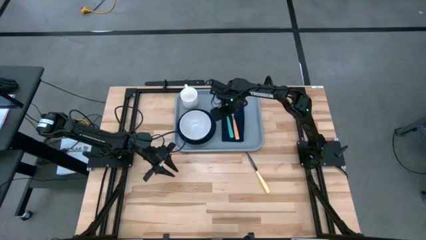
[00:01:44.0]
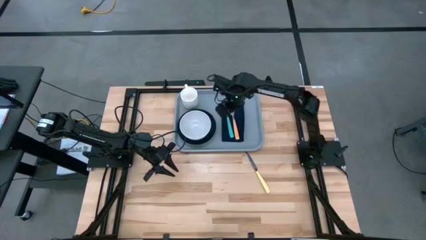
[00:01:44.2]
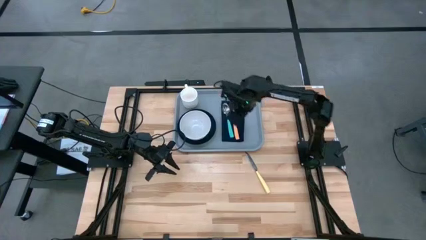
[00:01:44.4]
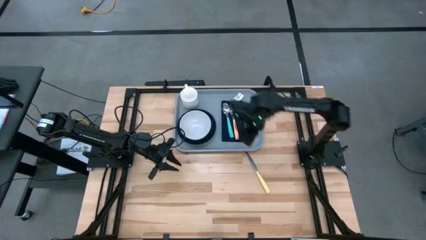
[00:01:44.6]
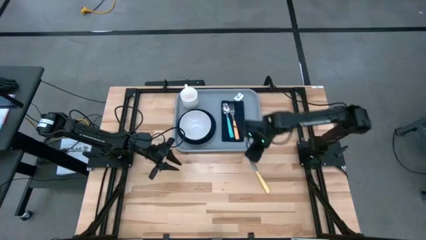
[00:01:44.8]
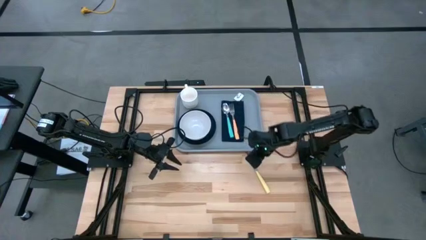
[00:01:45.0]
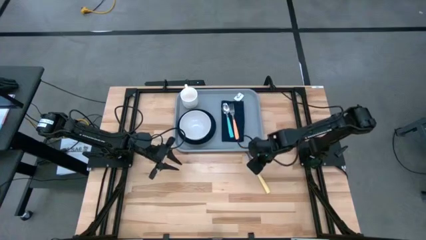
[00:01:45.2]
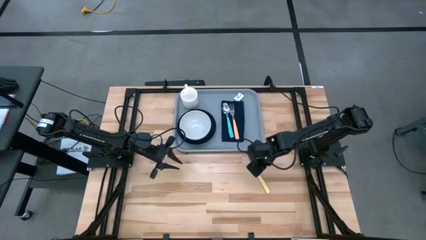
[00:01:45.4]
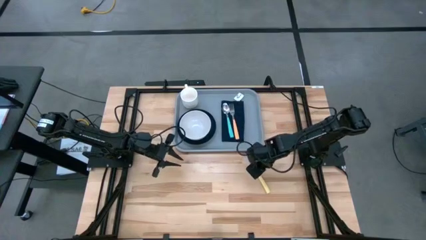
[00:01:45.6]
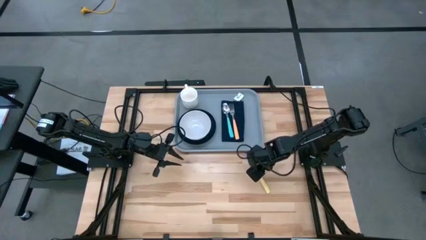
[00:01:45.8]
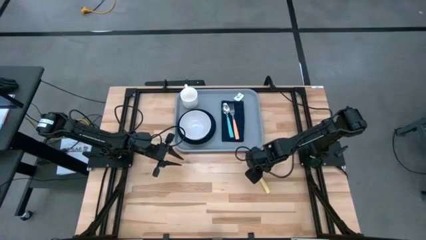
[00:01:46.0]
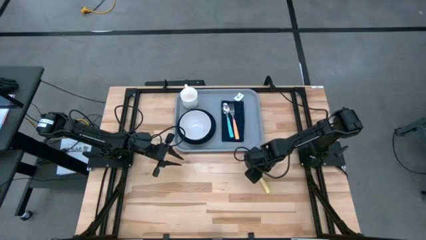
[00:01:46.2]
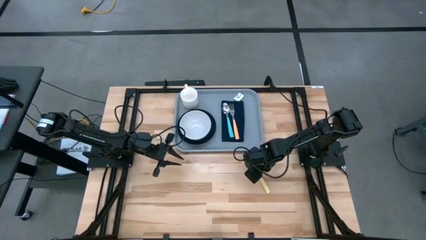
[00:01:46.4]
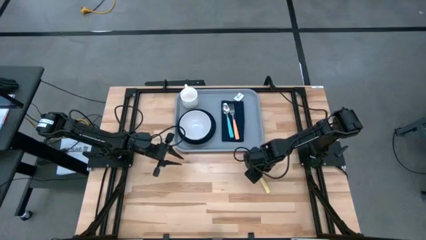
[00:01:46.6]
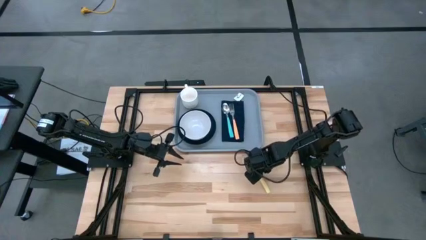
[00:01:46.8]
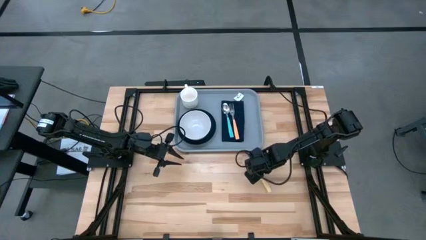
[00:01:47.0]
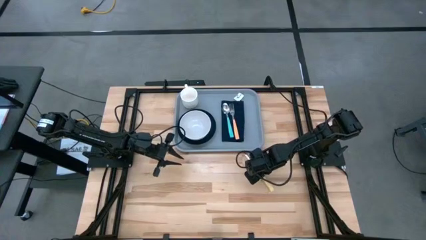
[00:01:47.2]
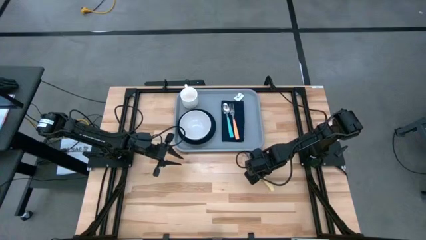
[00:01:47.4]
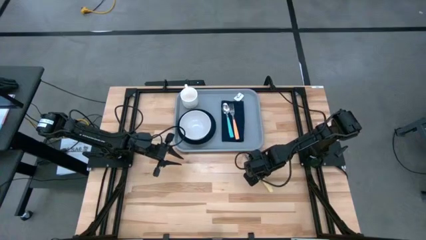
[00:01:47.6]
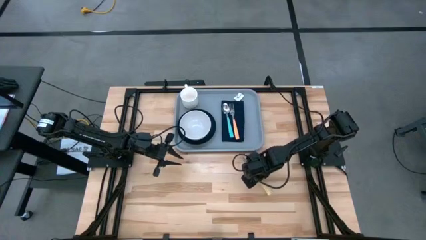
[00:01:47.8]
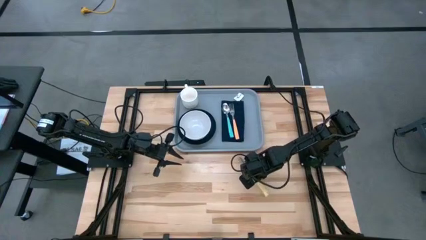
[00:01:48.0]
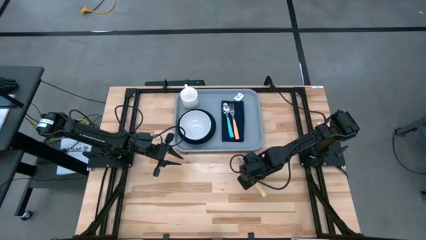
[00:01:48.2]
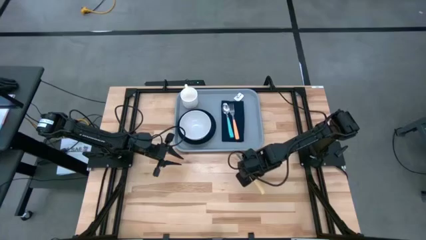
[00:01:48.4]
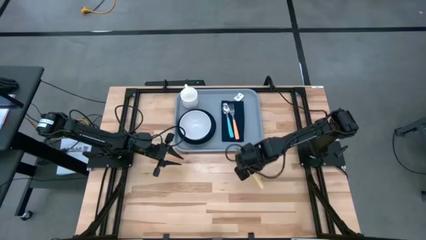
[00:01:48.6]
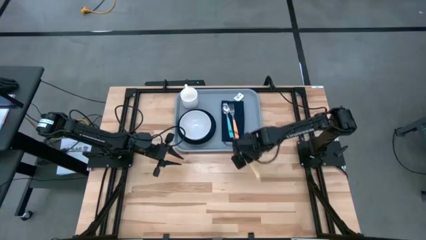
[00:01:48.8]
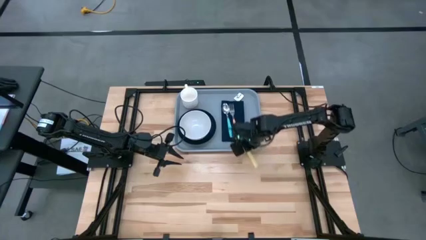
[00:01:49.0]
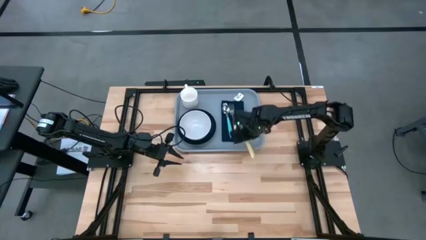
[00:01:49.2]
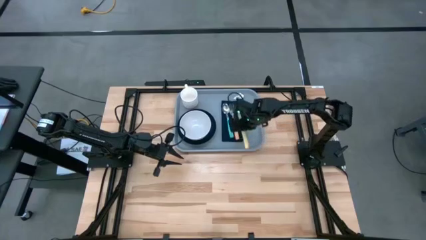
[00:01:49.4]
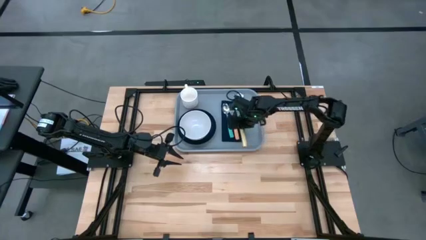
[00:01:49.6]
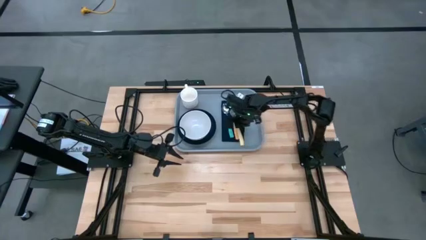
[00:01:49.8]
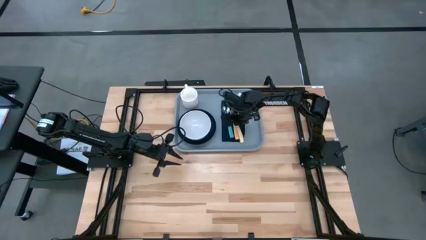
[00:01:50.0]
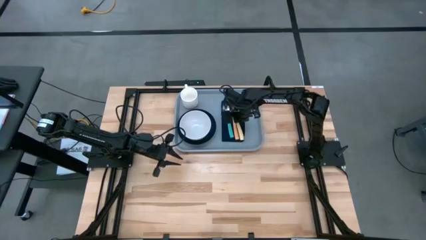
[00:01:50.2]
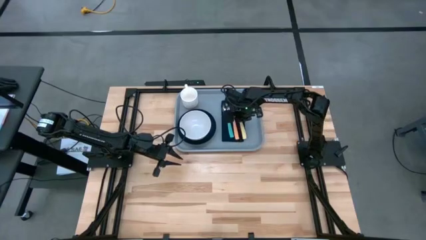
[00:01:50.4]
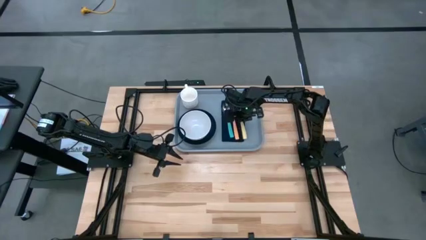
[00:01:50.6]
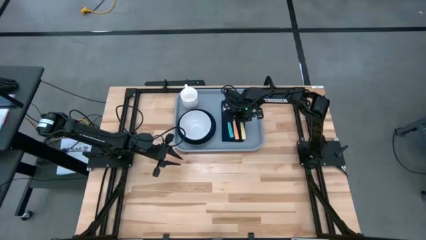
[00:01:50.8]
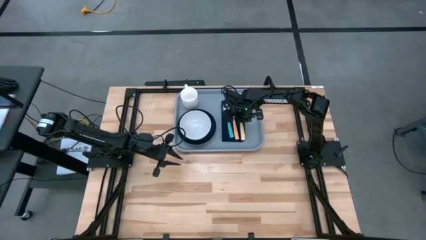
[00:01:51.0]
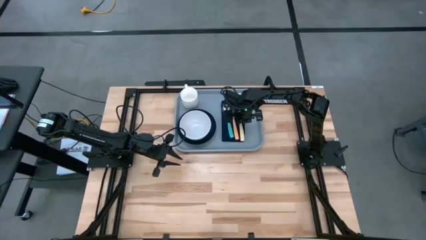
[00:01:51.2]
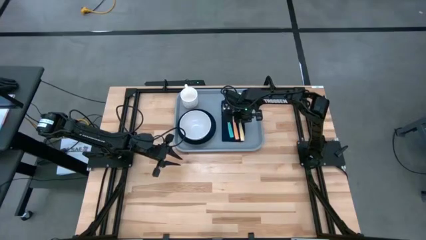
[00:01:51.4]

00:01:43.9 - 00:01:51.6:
Task: Set up tray
Put the yellow knife to the right of the orange fork on the blue table napkin

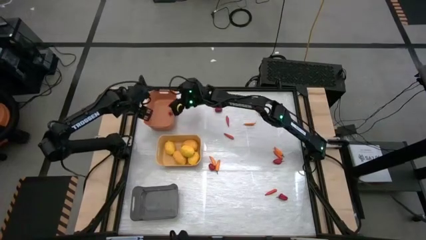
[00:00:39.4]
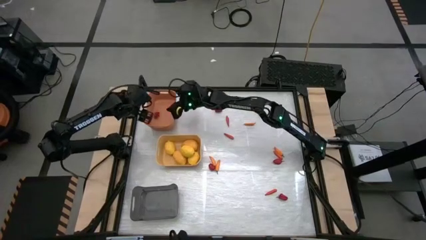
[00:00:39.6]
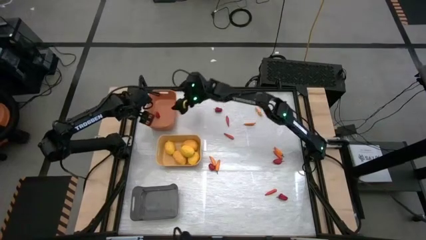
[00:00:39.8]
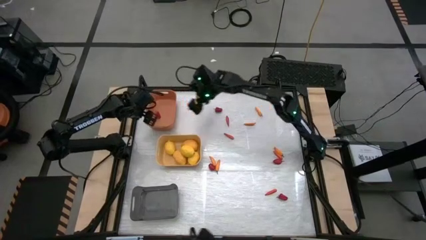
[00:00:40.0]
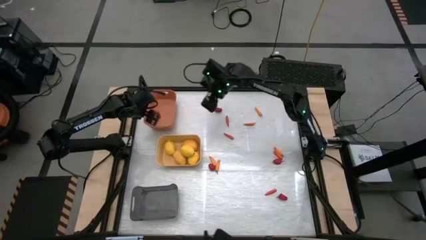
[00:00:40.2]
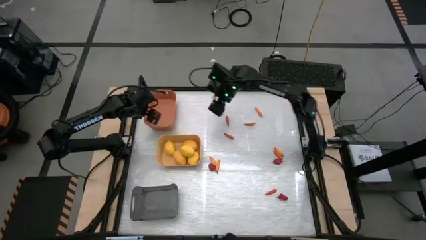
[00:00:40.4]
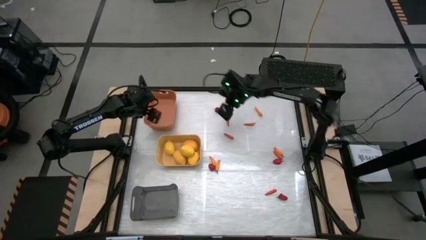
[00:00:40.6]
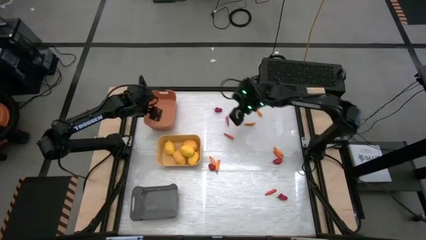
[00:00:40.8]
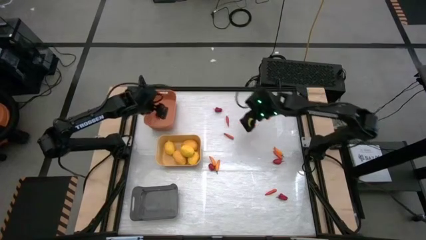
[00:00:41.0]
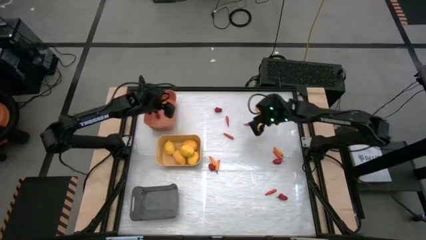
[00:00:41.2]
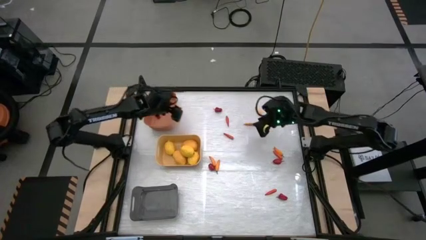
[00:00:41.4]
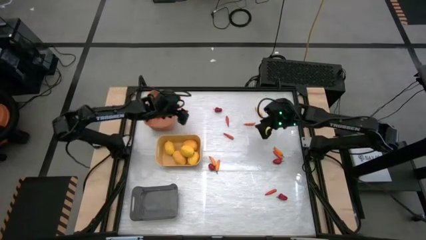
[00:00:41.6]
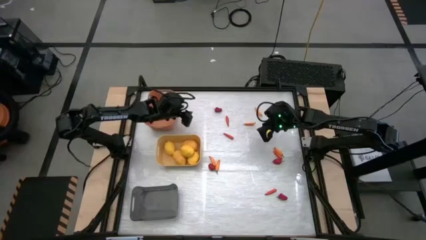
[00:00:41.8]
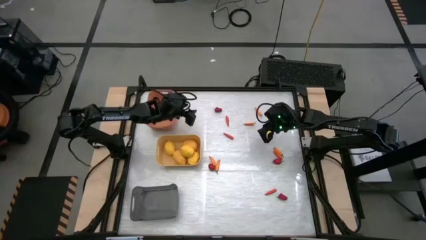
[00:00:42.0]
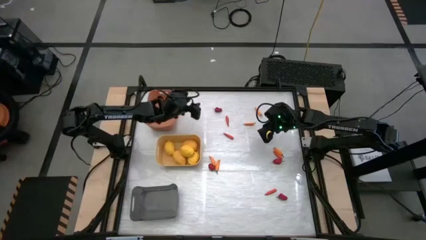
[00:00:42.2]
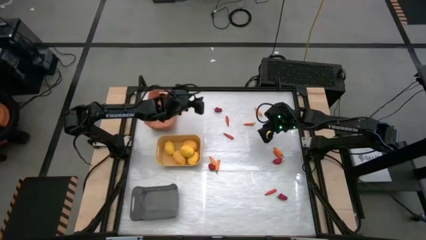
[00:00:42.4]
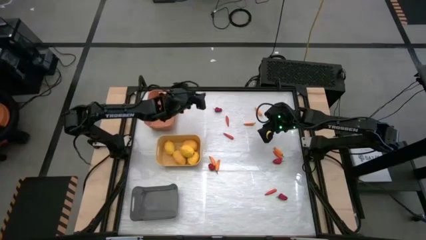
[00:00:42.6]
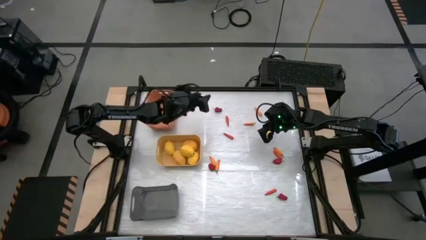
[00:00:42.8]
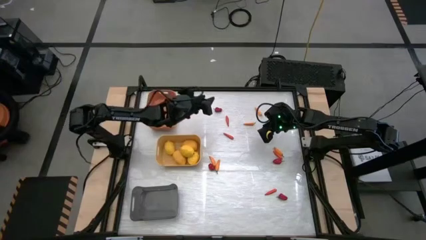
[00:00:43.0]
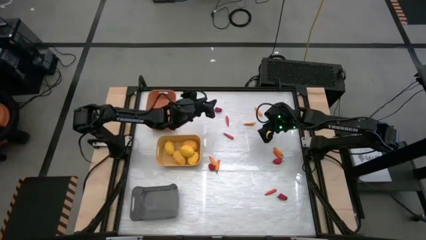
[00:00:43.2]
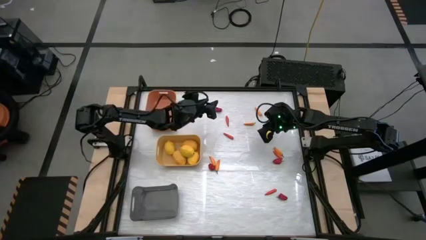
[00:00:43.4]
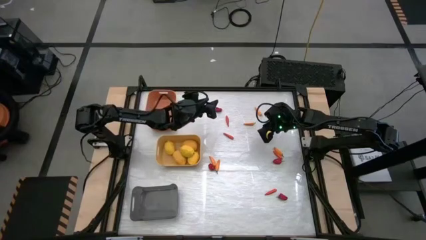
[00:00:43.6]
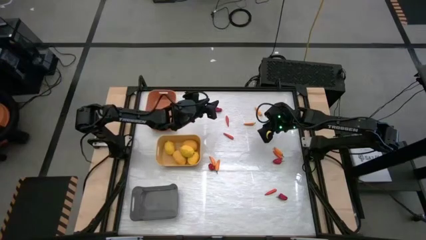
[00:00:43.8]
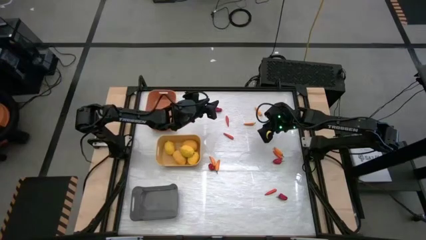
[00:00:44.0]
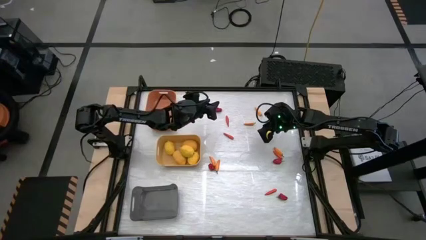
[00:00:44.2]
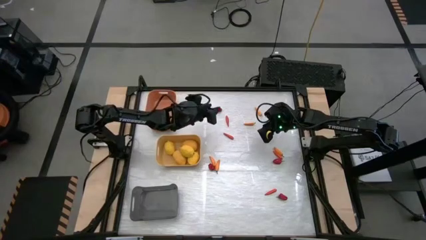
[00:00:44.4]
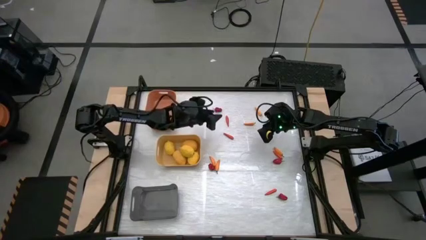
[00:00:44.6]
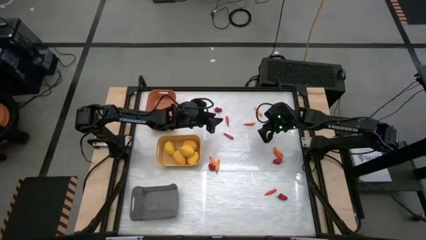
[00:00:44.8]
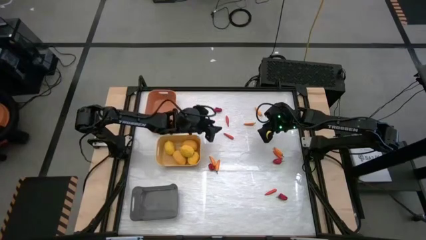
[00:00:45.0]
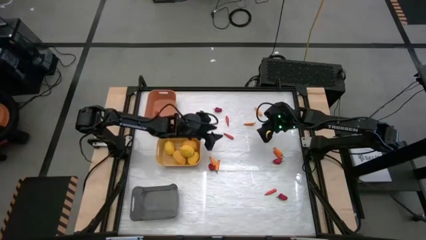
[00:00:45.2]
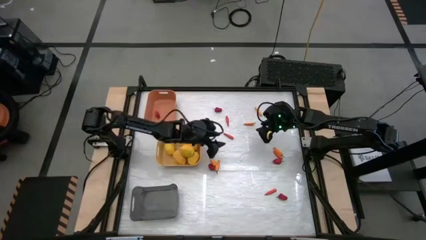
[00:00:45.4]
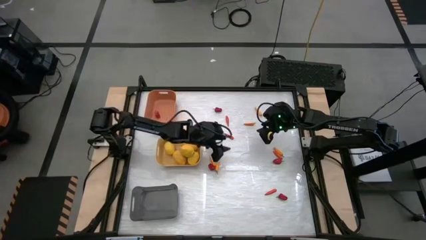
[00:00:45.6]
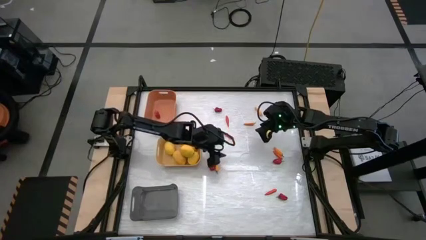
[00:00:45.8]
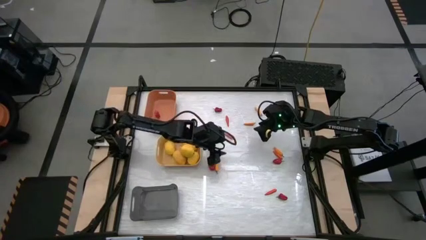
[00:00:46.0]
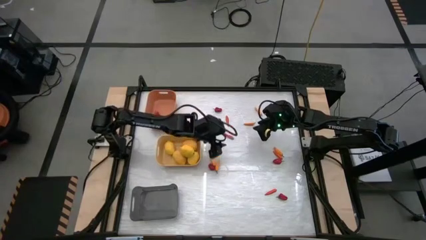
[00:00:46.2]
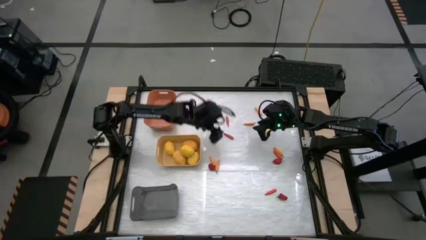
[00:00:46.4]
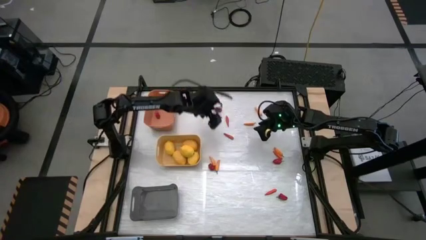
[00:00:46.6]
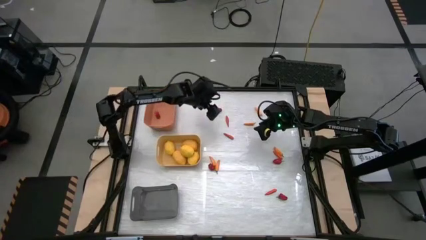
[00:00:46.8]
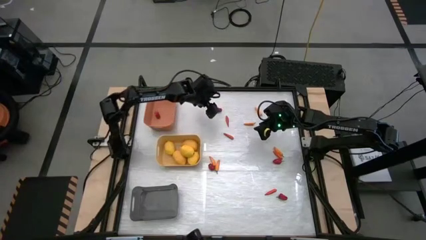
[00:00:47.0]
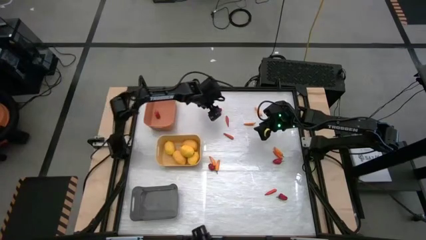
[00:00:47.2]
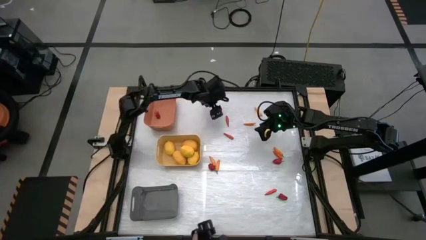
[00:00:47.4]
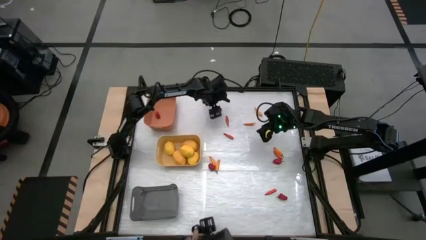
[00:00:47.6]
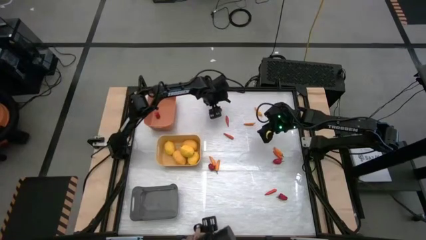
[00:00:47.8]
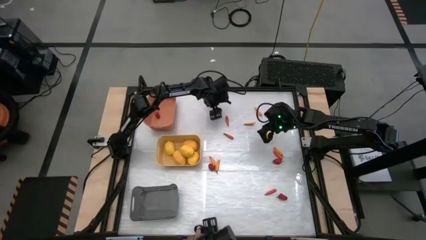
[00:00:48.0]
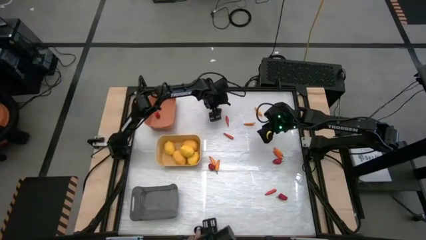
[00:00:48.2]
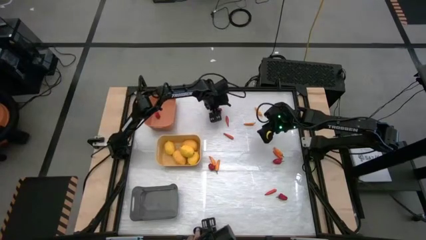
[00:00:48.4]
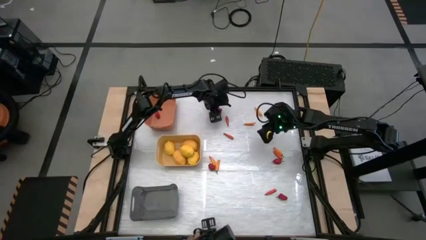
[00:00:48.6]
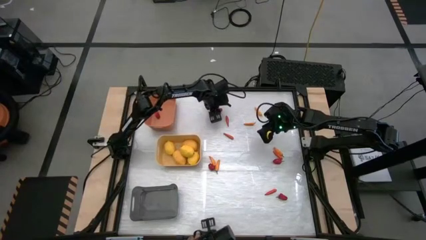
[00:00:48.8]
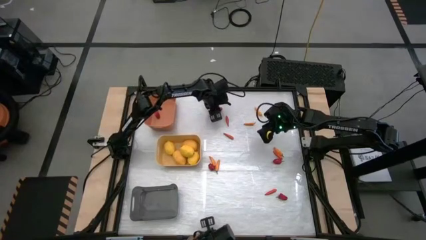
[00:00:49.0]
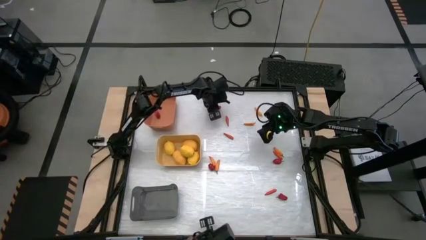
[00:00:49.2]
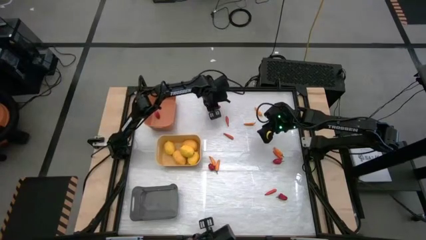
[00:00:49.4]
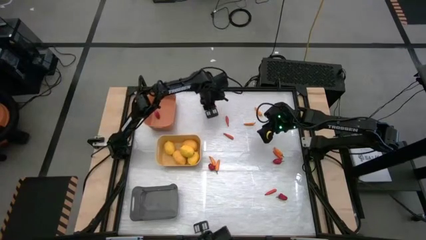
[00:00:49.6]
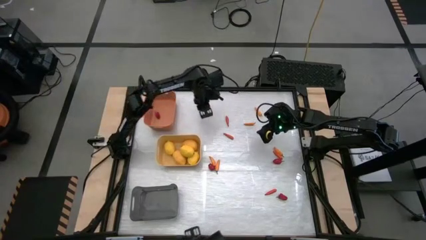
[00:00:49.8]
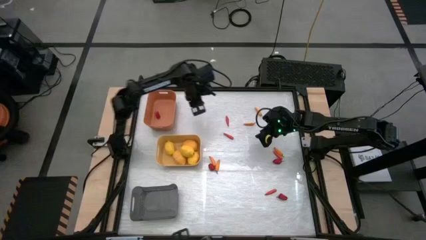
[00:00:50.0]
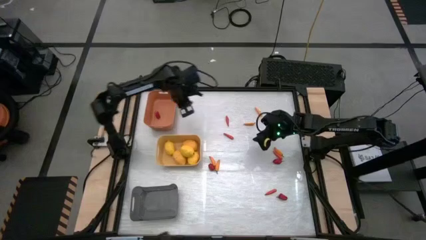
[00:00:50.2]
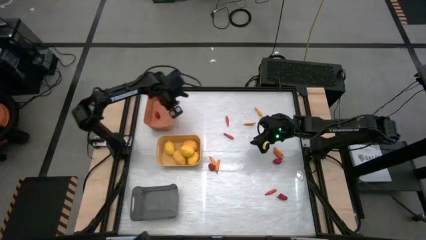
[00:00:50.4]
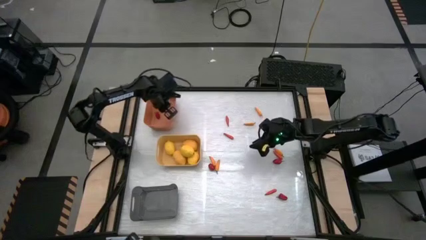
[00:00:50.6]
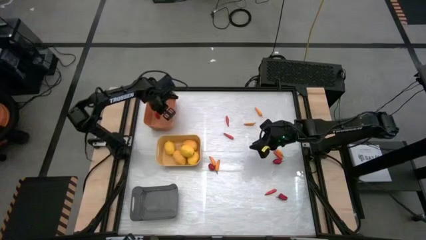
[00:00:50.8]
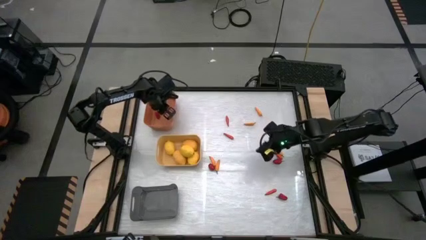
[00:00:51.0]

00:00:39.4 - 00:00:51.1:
Task: Sort produce into baskets
Put the red chili pepper into the orange bin
